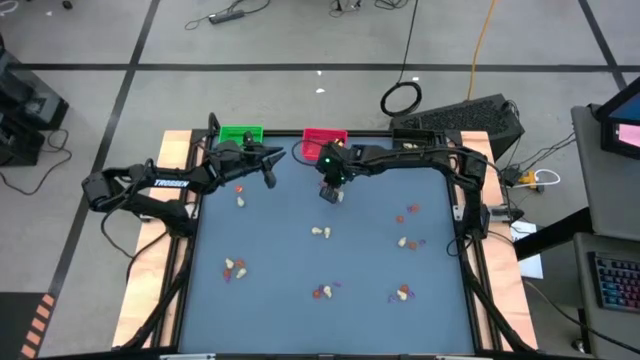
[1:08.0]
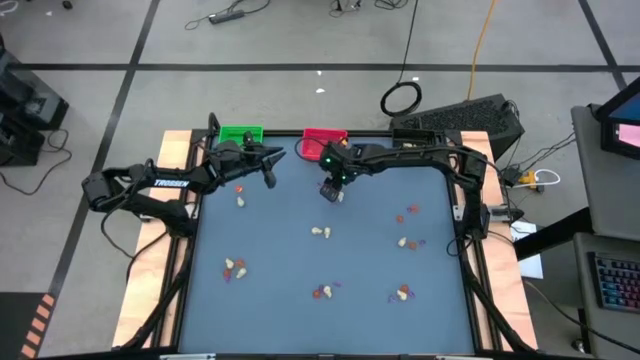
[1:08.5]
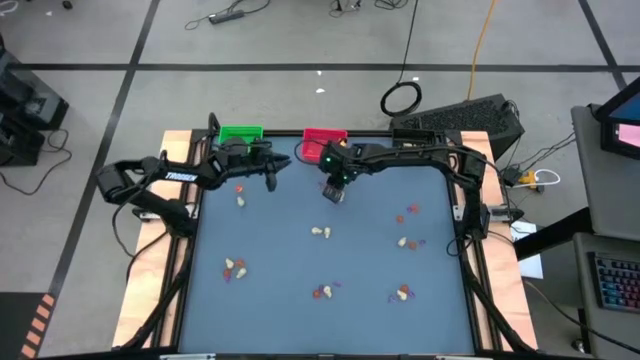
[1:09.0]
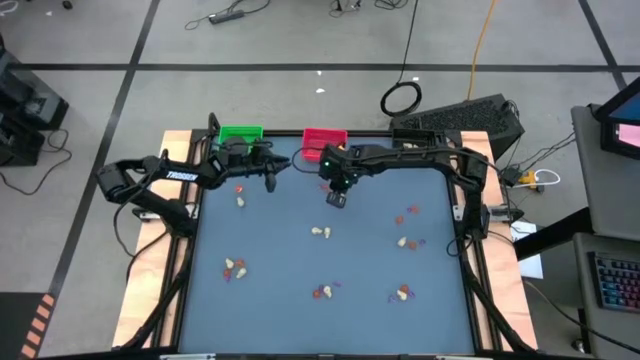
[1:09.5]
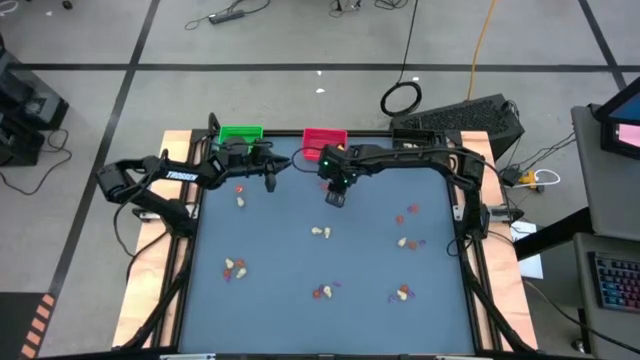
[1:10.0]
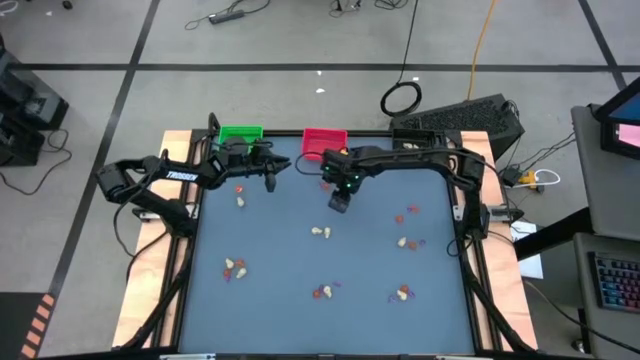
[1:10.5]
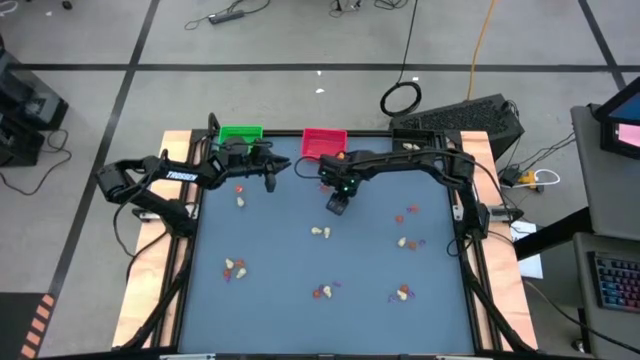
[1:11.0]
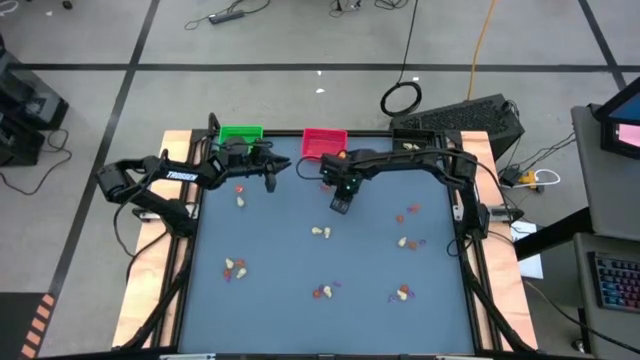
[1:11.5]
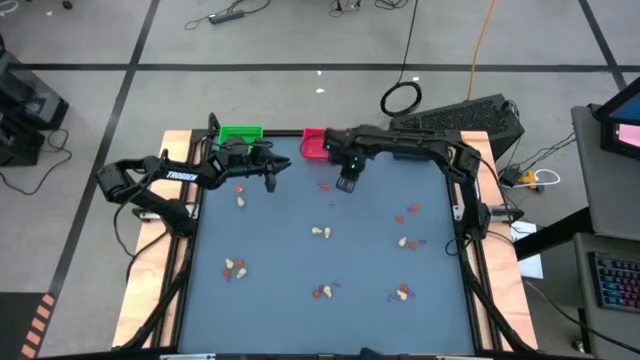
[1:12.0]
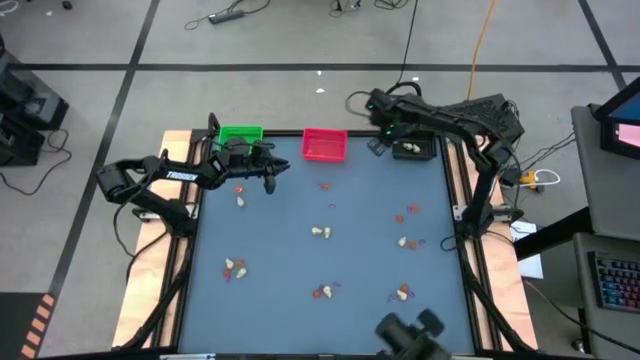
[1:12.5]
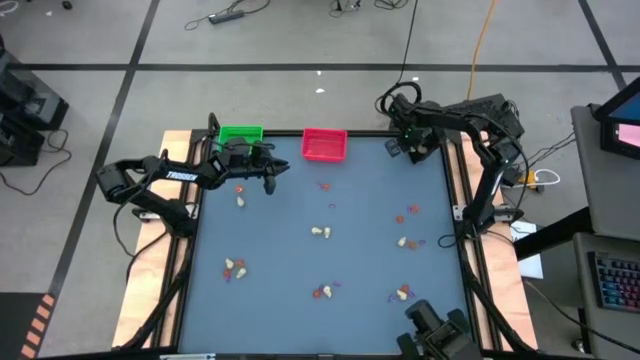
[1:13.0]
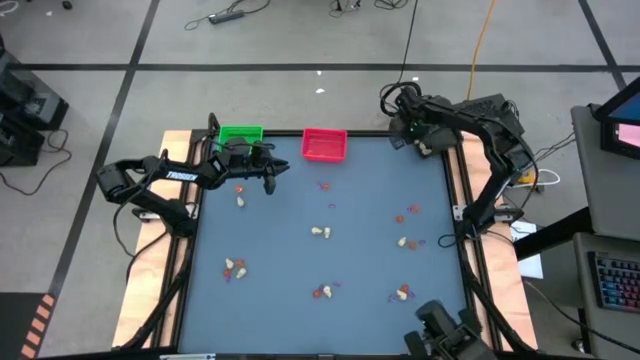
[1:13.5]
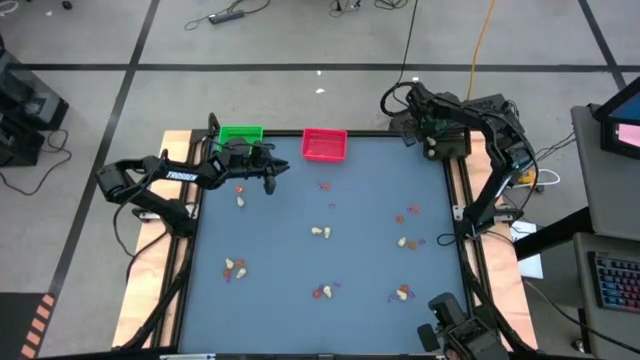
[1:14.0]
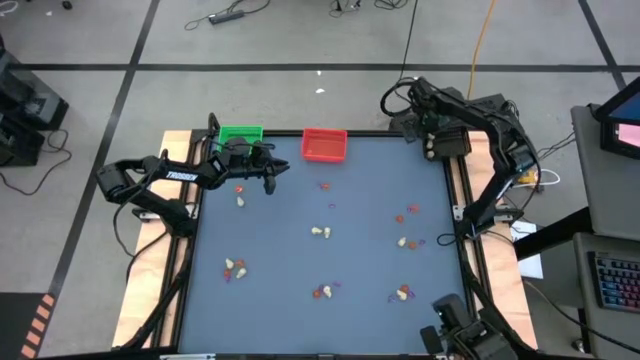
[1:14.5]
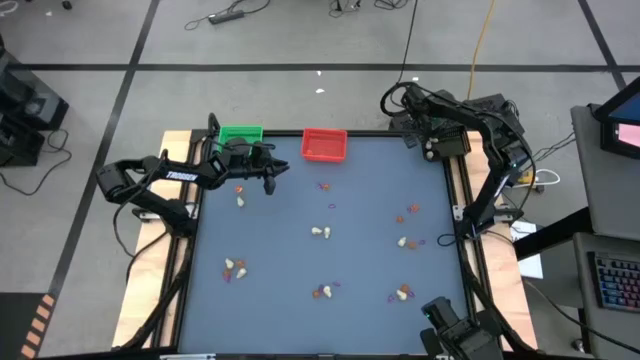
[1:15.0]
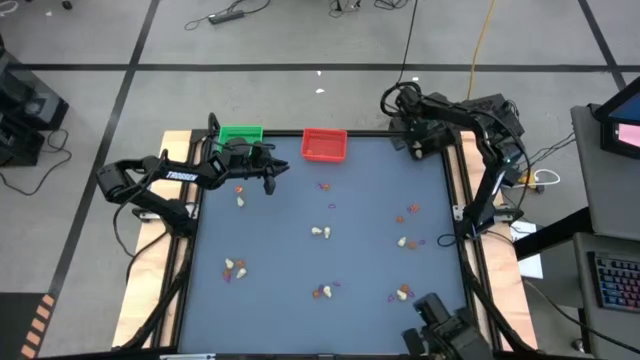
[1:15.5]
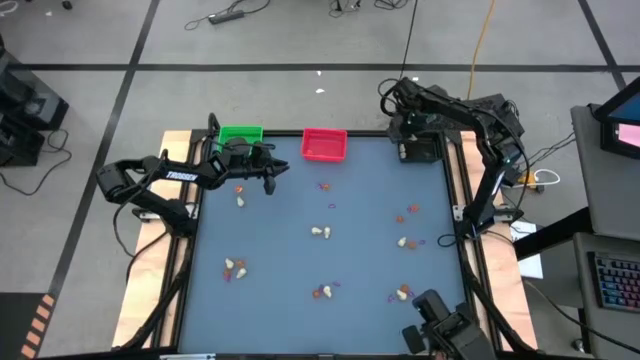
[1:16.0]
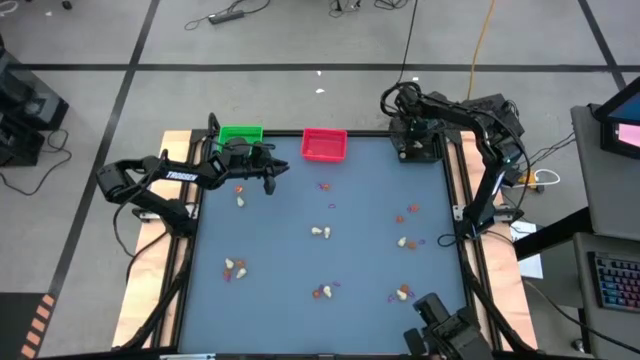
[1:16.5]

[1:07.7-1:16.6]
Task: Sort Halloween decoration
Put the white skull toy into the black bin

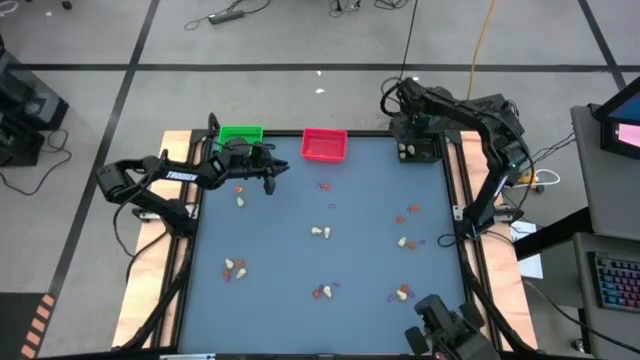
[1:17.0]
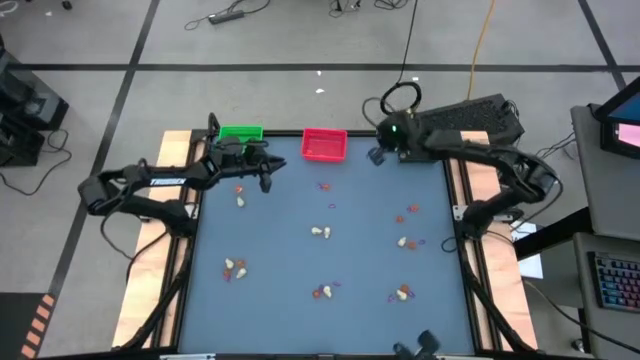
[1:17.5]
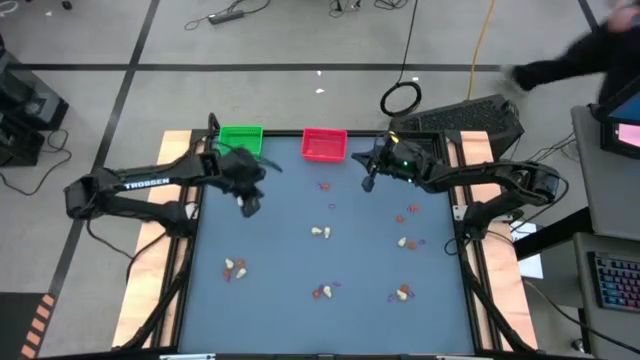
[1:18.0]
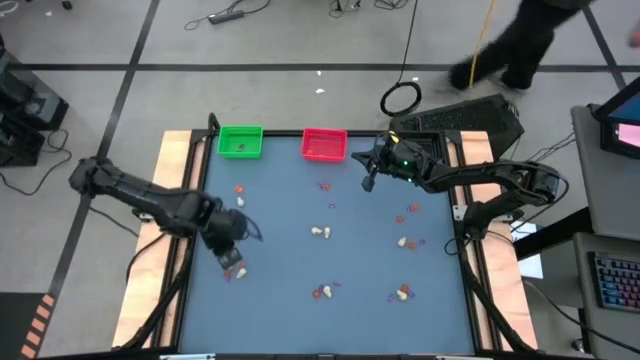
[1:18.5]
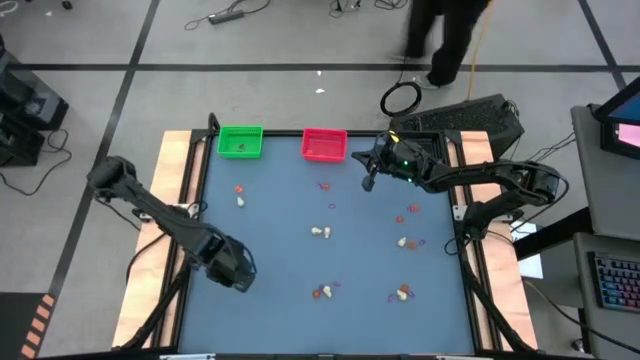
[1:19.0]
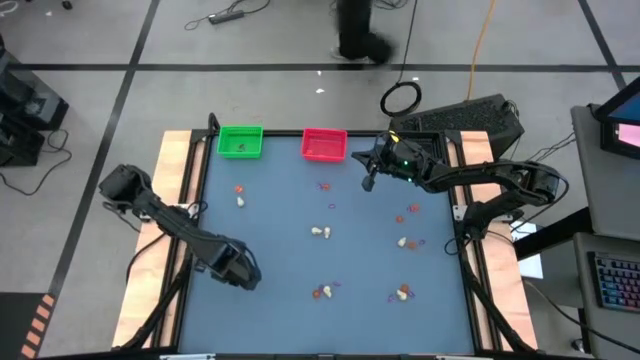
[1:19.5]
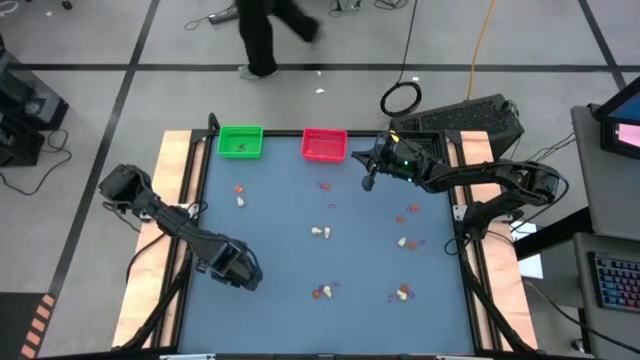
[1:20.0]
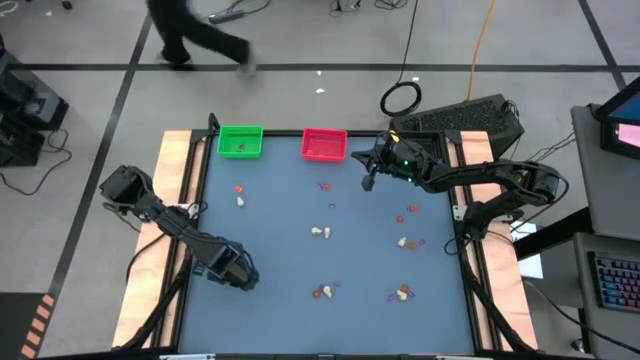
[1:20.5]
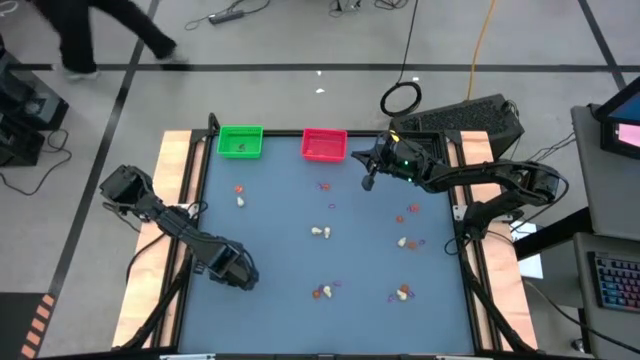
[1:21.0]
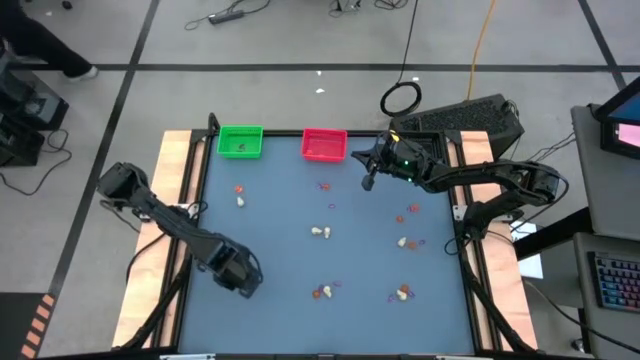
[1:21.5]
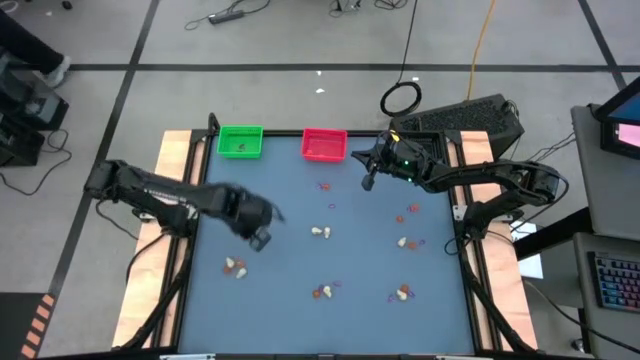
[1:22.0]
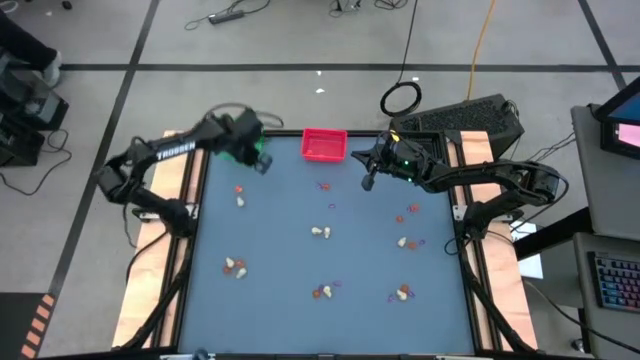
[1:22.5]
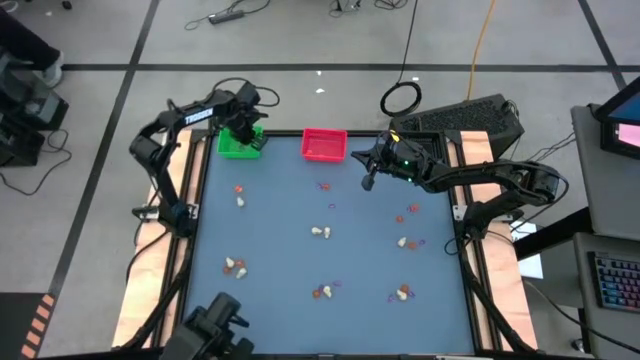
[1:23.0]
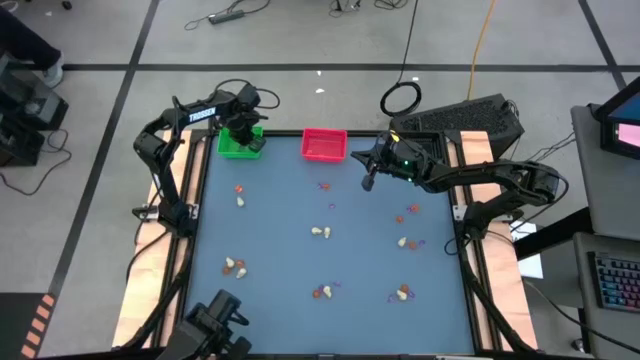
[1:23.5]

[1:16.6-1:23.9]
Put the purple witch hat toy into the green bin

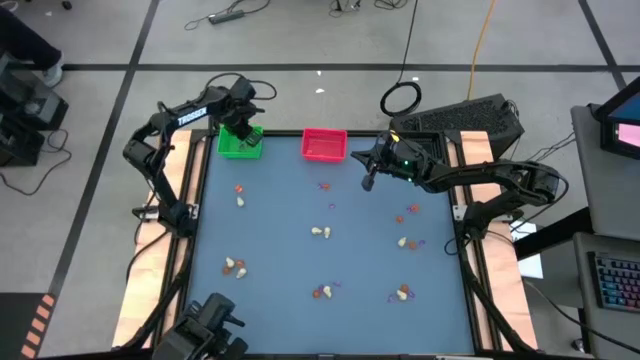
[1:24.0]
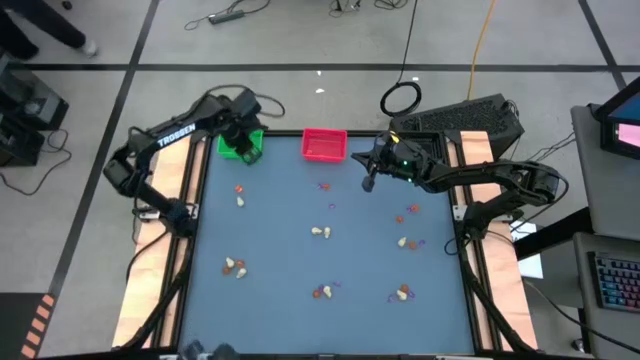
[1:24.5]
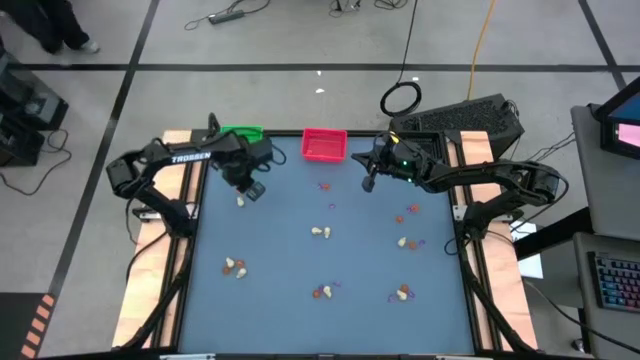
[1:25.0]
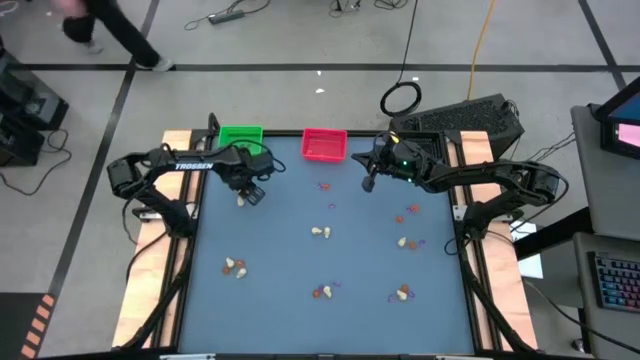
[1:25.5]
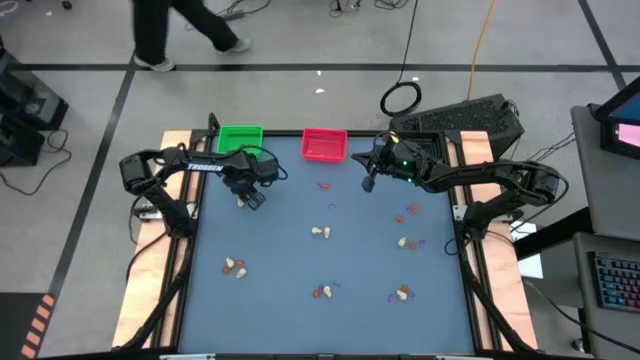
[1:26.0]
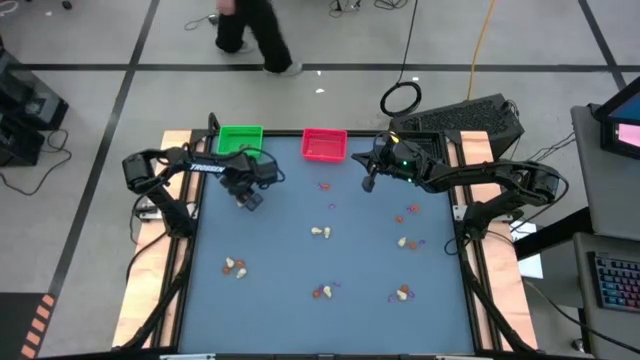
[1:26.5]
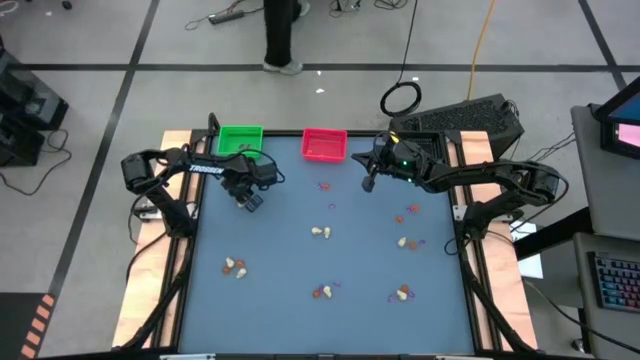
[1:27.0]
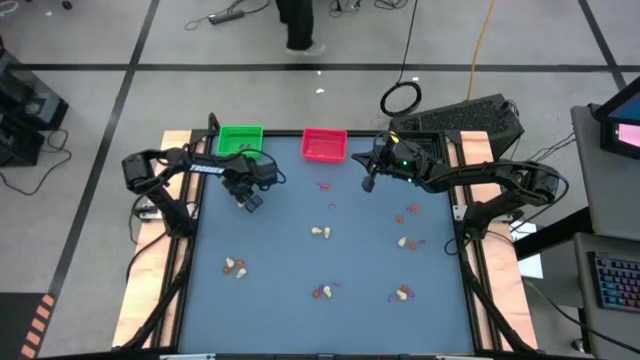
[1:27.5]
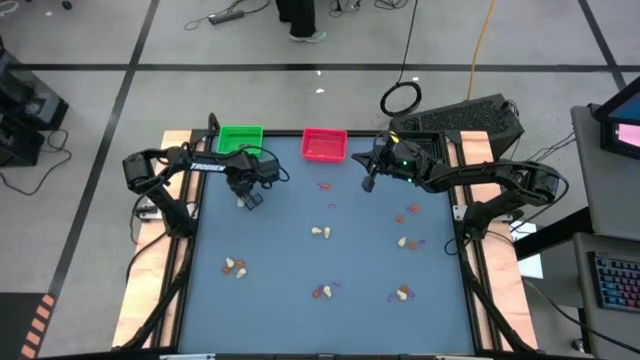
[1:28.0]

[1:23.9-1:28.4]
Put the orange pumpkin toy into the red bin

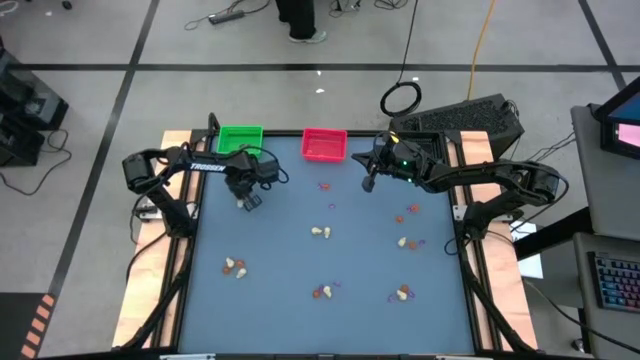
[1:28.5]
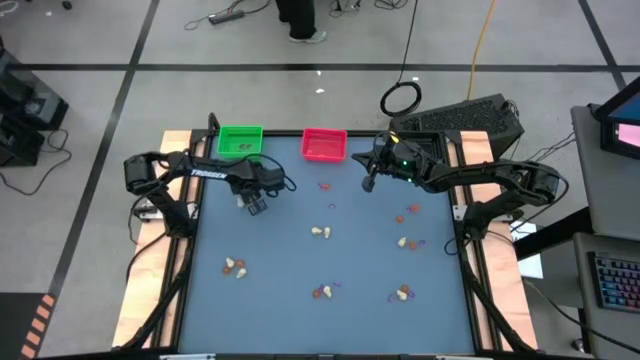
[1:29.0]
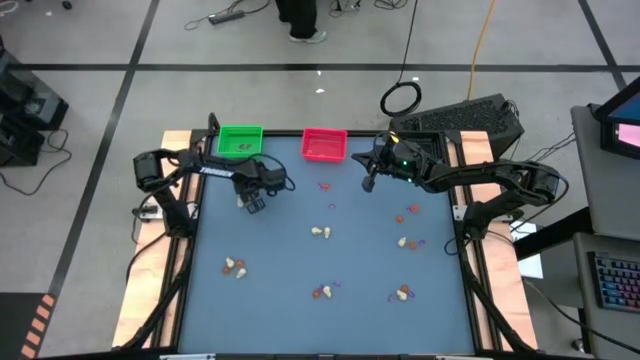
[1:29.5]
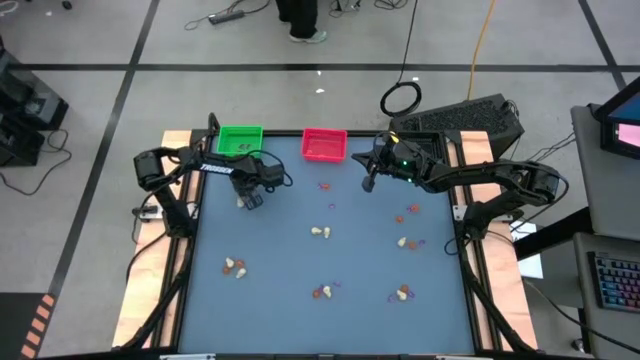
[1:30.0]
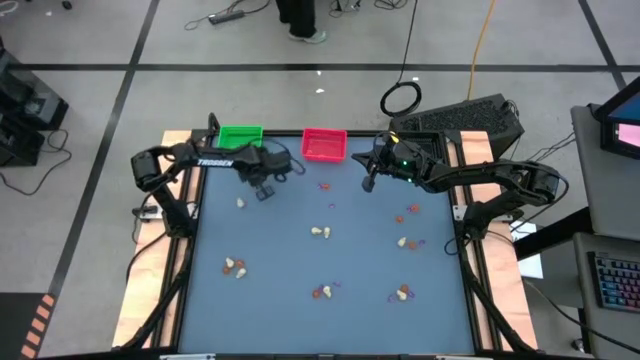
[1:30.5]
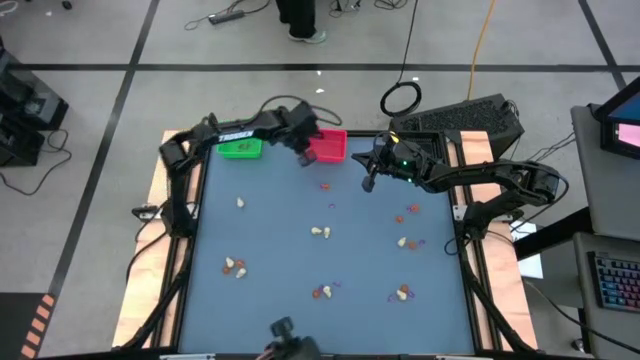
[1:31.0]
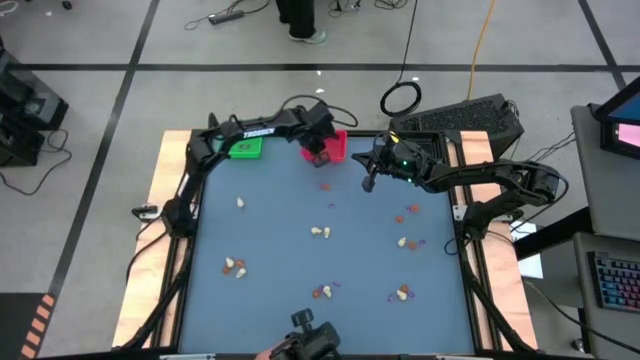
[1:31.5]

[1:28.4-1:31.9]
Put the orange pumpkin toy into the red bin
